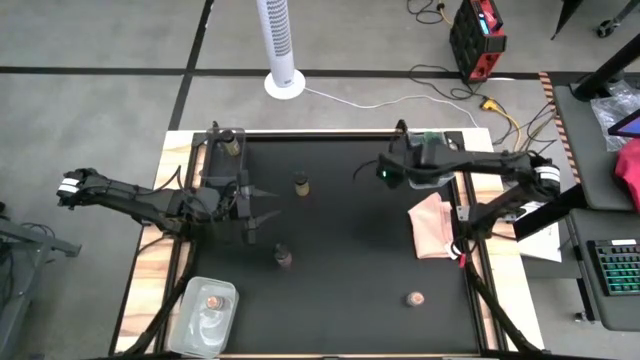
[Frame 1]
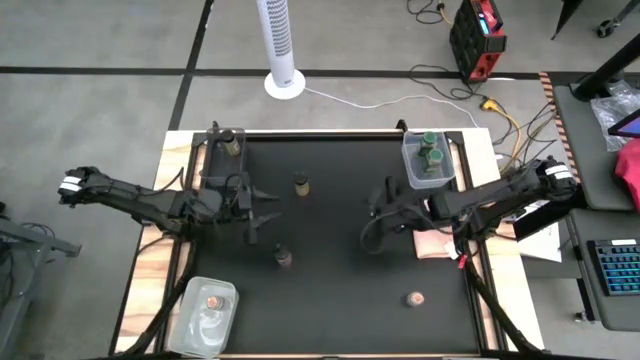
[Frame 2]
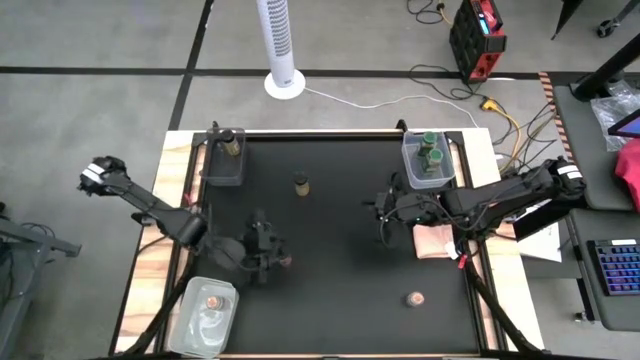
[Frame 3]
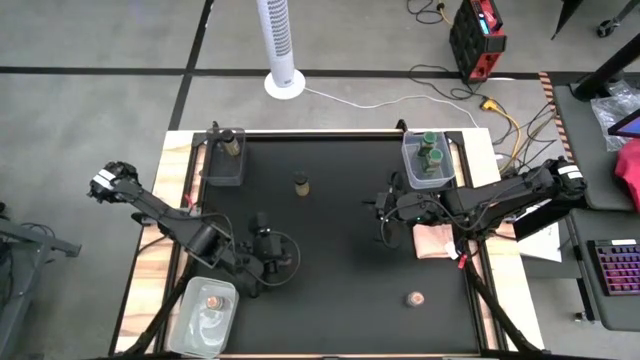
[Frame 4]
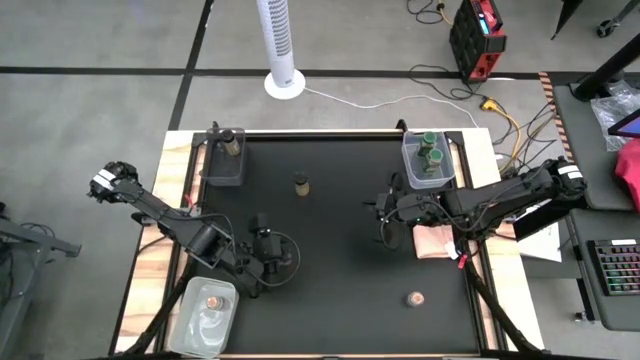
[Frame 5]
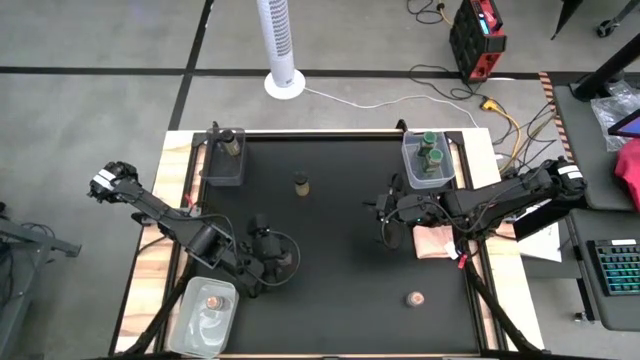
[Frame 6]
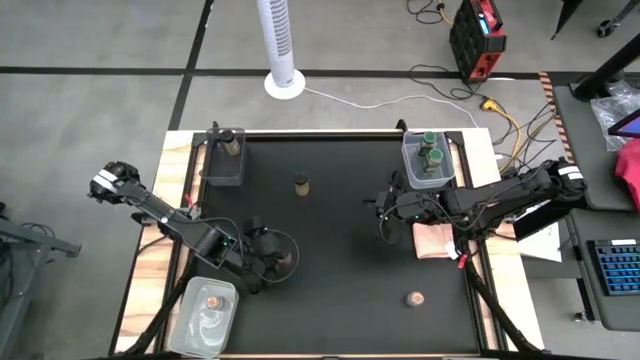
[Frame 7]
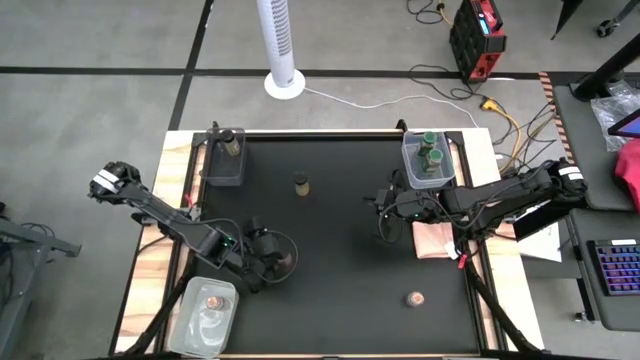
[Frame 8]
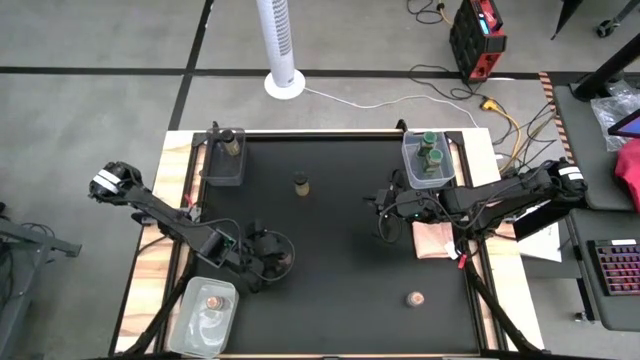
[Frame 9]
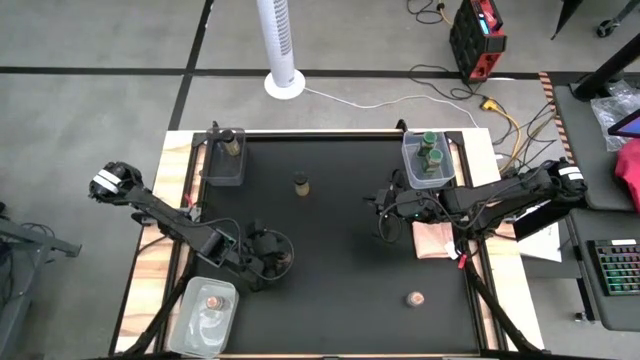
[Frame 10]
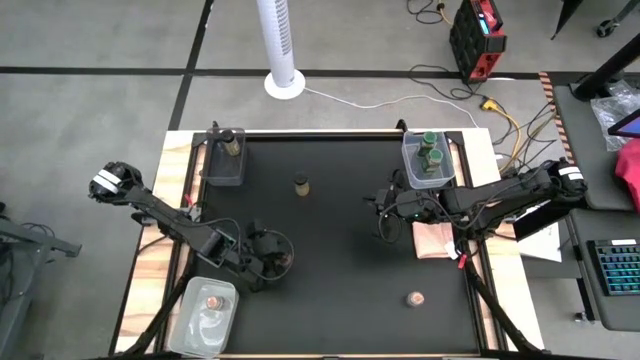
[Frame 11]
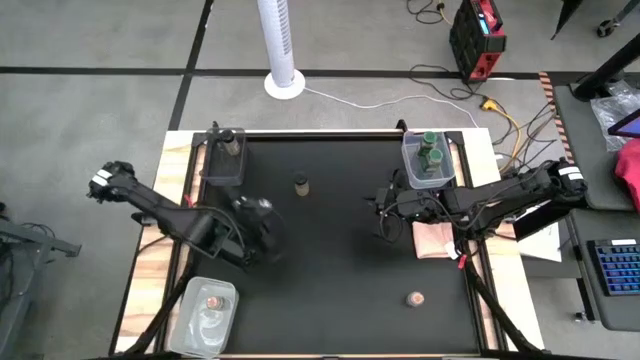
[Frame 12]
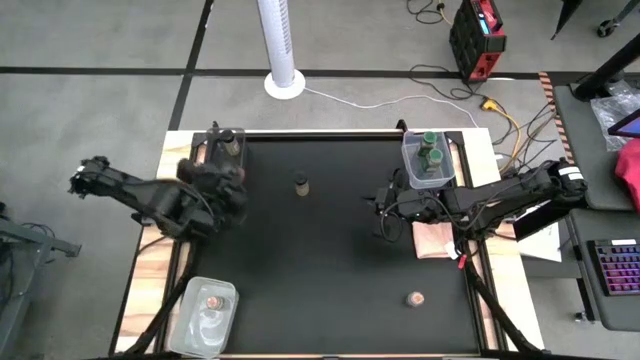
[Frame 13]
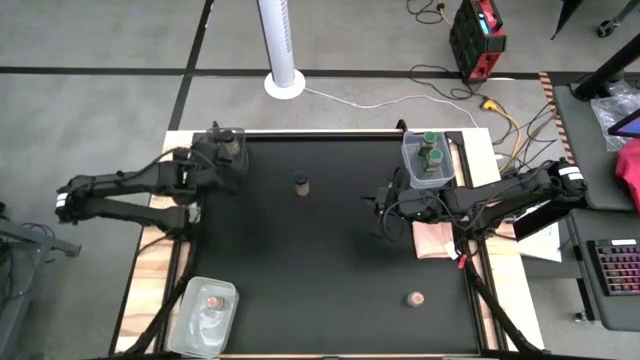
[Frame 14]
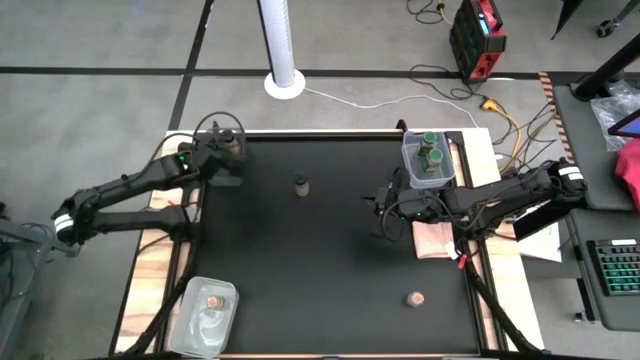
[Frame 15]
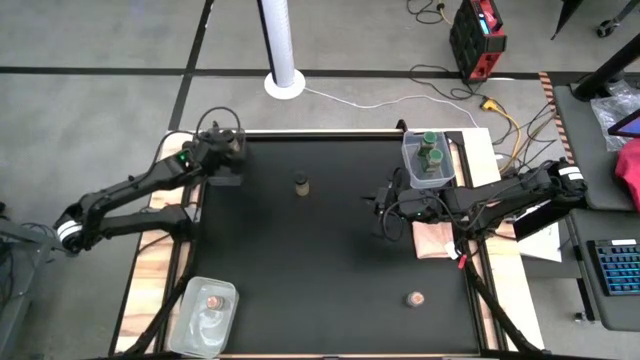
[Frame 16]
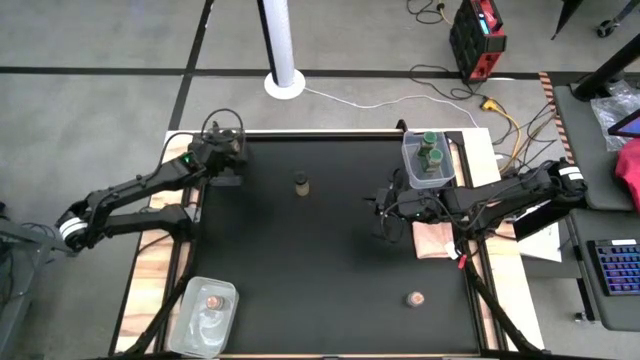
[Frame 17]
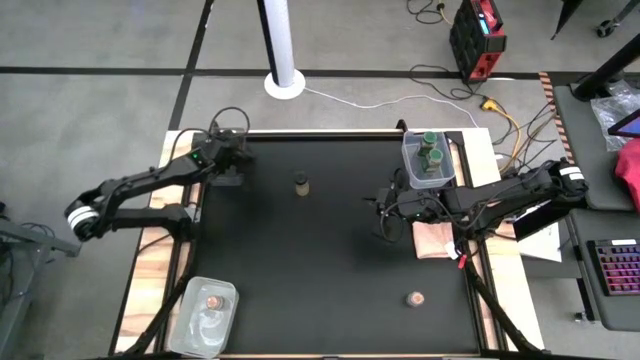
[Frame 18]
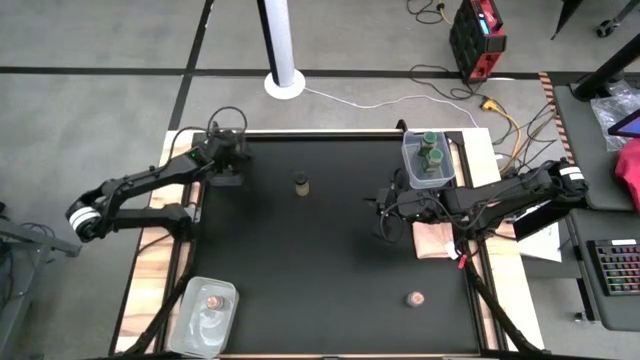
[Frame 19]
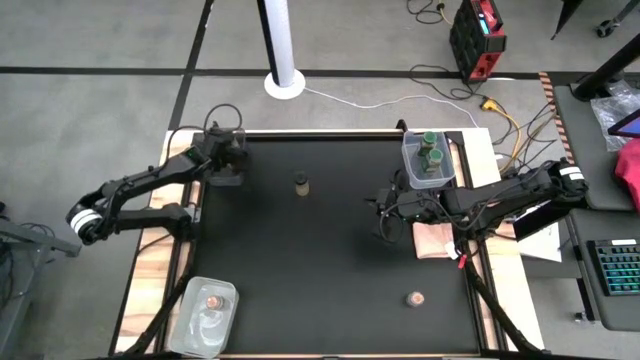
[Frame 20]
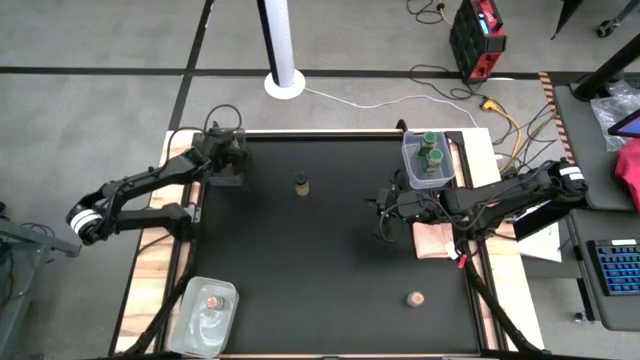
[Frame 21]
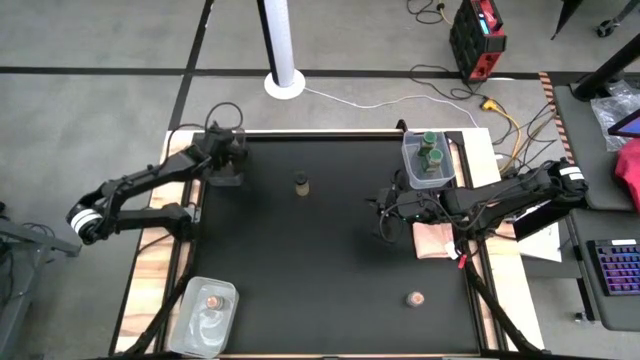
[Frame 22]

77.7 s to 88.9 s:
Task: Sort spices by type
Put the bottom black spice bottle into the black bin

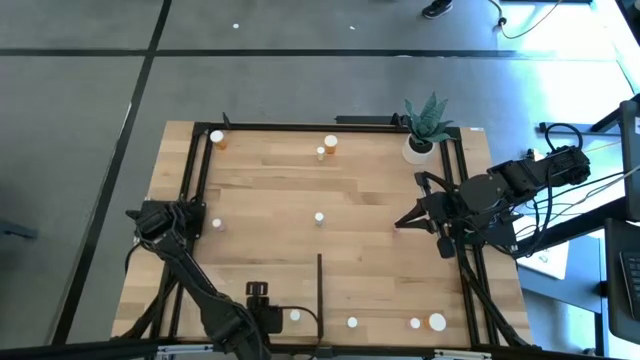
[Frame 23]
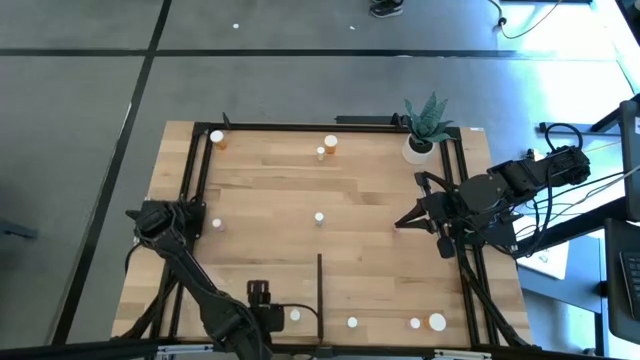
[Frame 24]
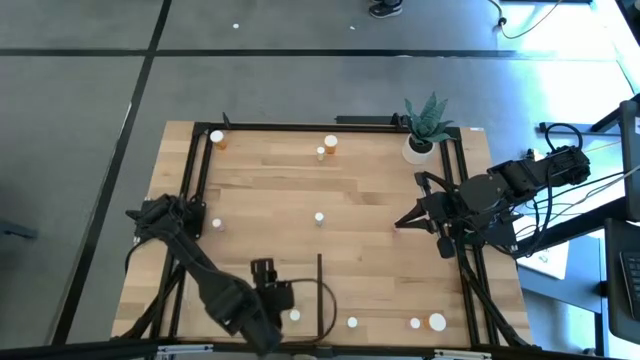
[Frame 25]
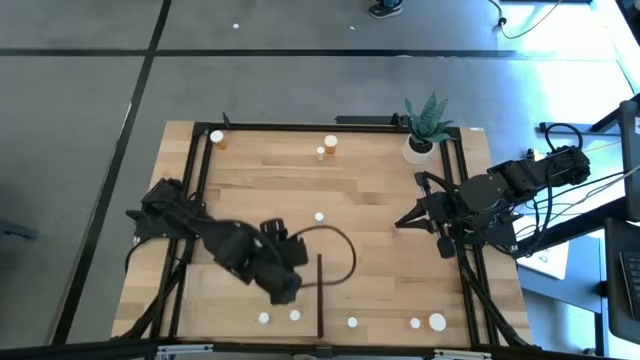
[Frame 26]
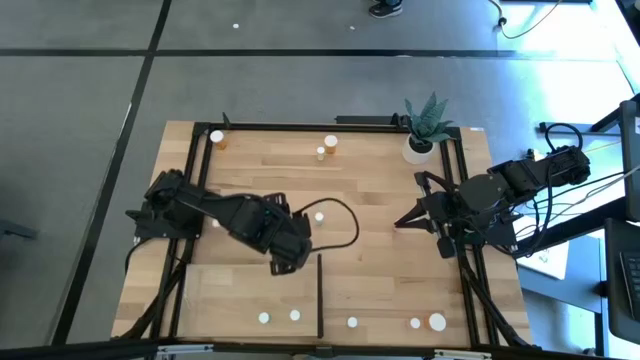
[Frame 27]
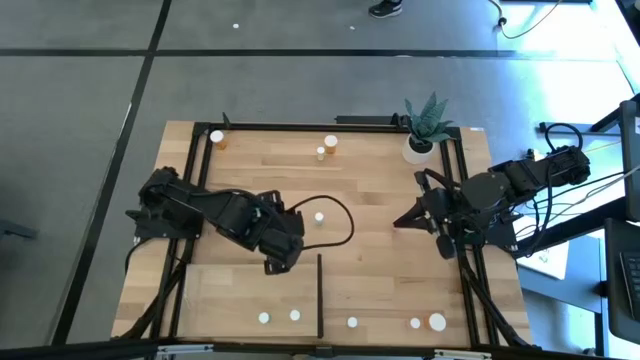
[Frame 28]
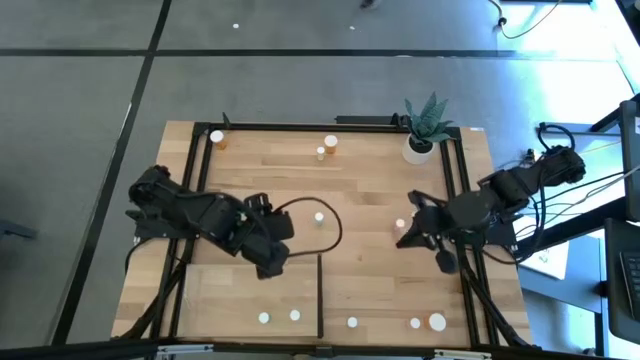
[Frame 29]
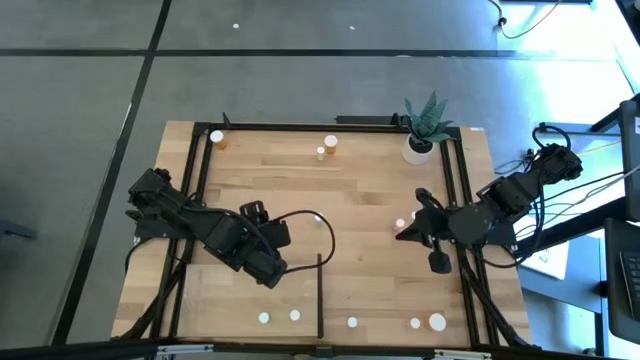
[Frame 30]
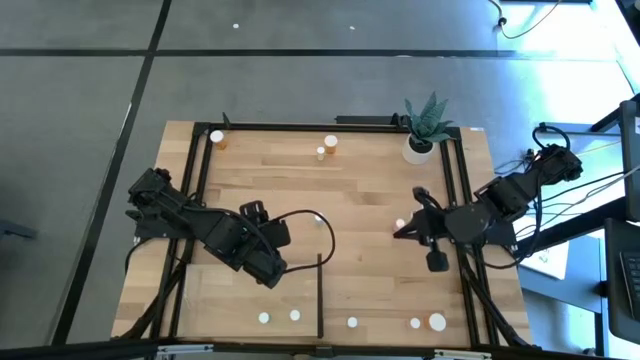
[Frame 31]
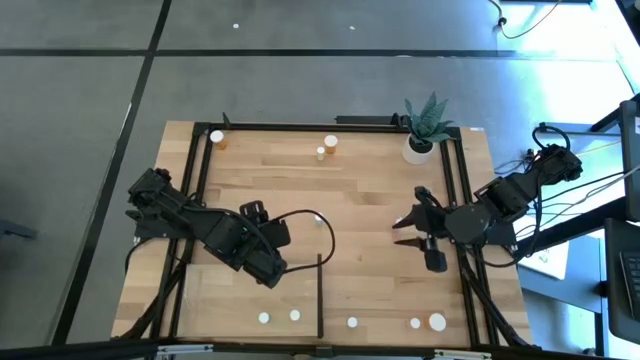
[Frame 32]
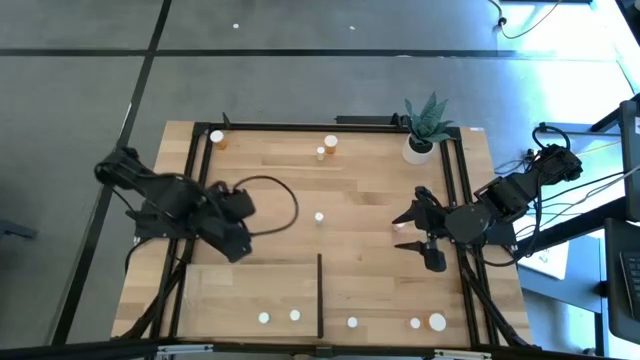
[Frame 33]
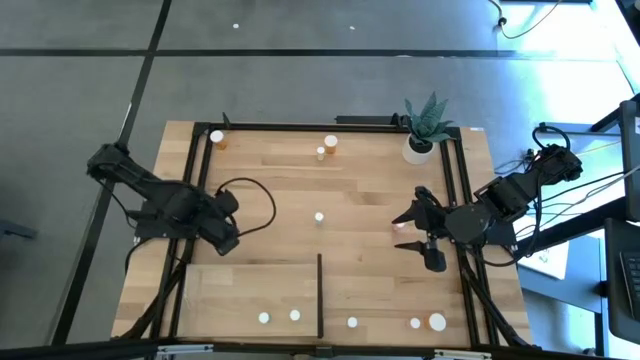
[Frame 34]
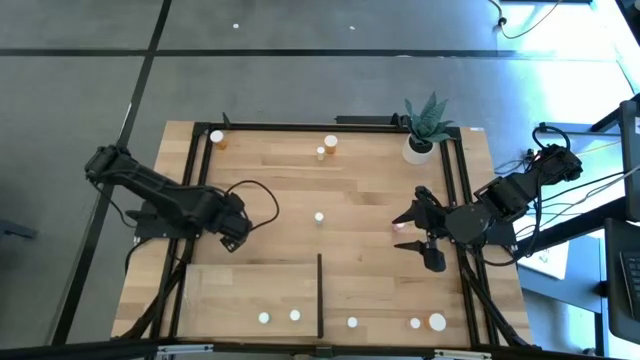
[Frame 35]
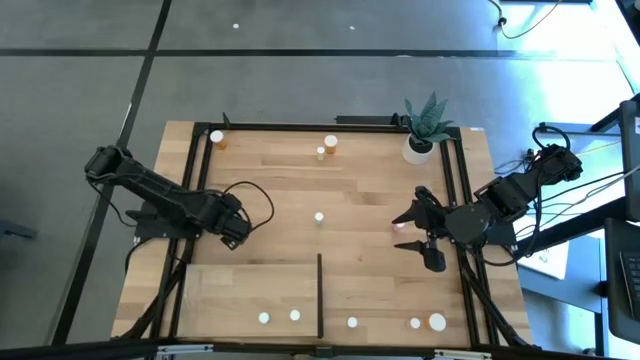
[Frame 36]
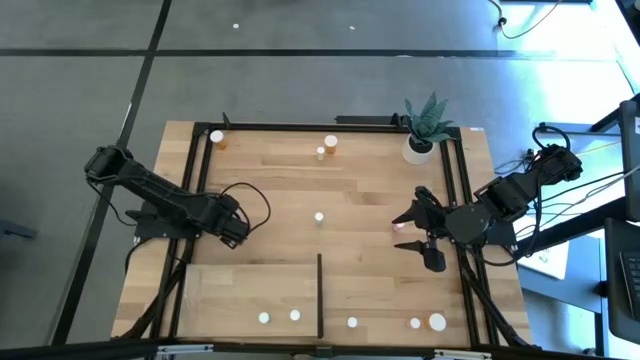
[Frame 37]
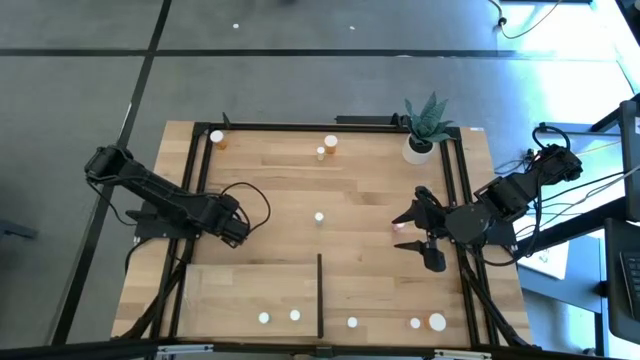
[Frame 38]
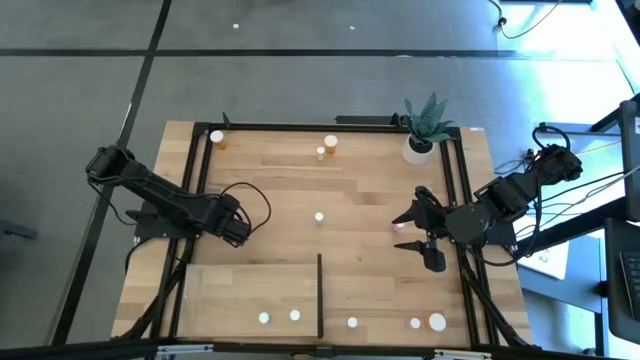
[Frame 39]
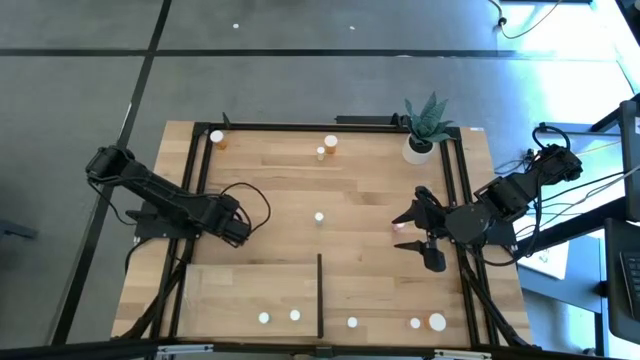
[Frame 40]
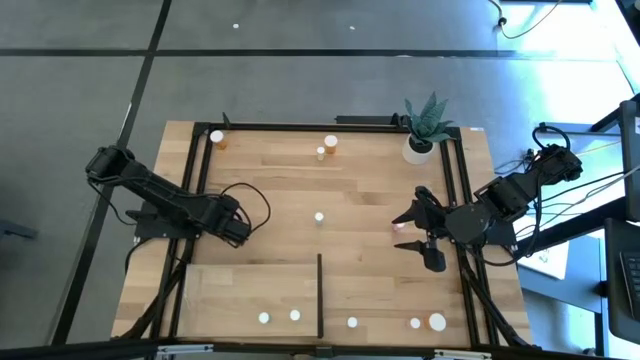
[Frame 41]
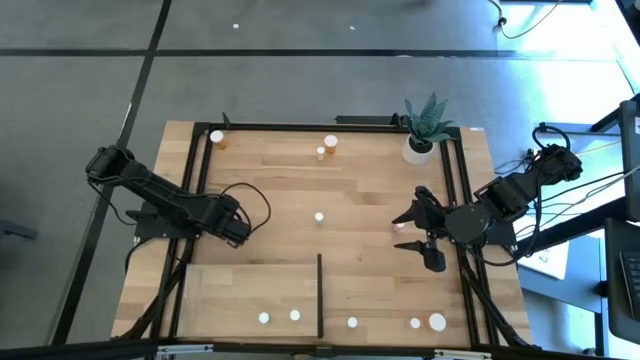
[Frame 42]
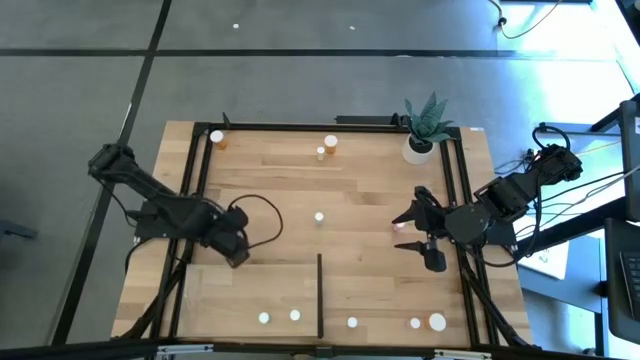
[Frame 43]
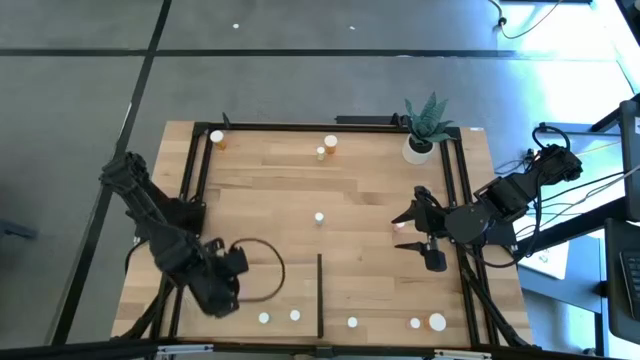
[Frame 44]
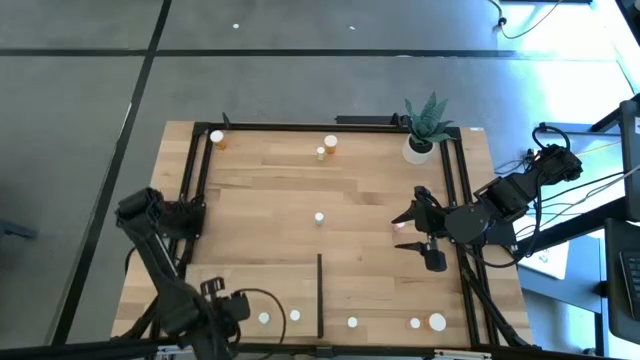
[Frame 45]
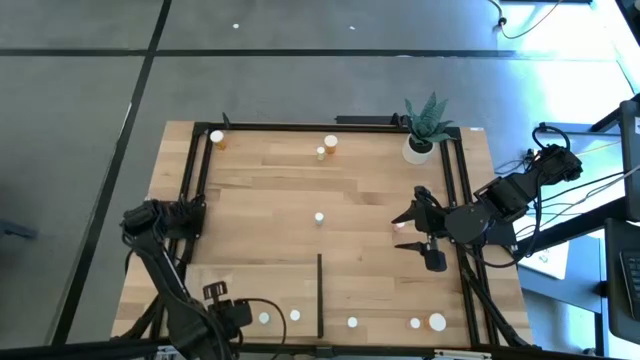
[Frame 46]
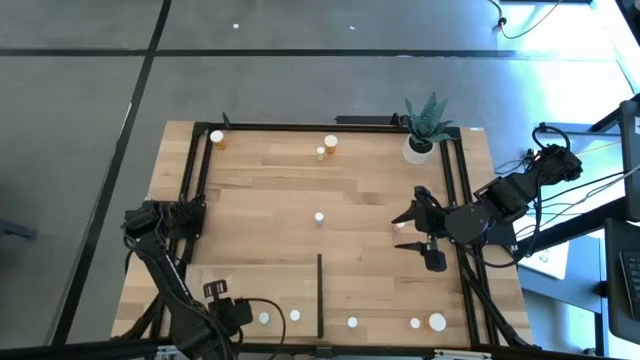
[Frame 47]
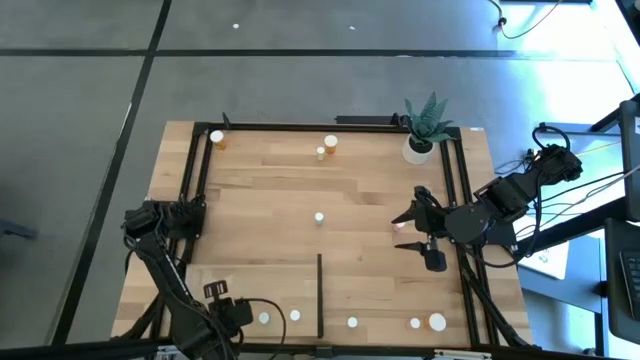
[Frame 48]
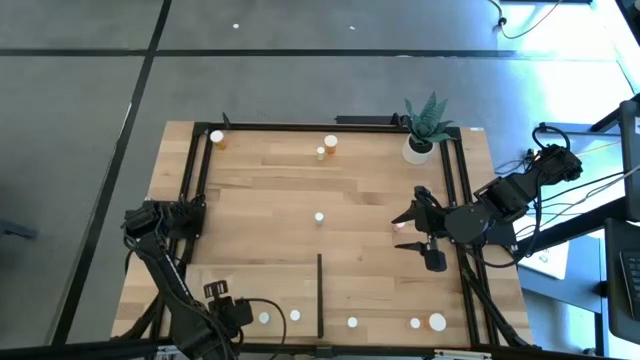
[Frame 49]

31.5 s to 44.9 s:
Task: Pick and place medicine bottles onto shelf by color
Put the left pink pill bottle on the shelf
